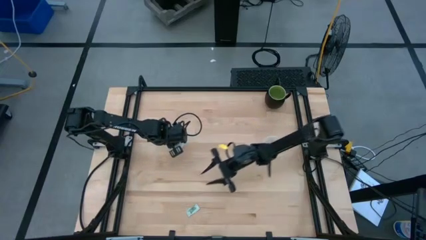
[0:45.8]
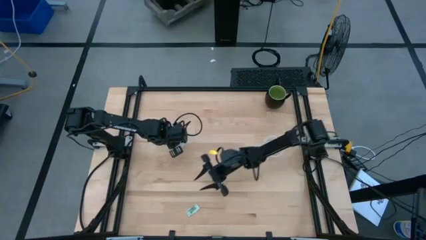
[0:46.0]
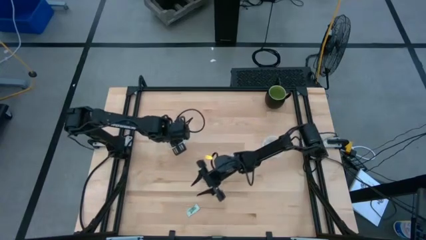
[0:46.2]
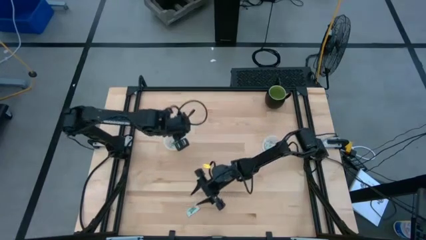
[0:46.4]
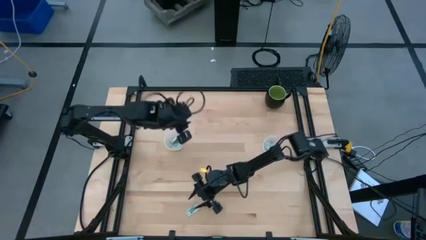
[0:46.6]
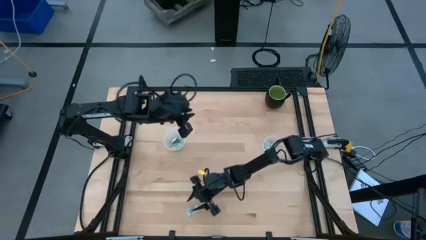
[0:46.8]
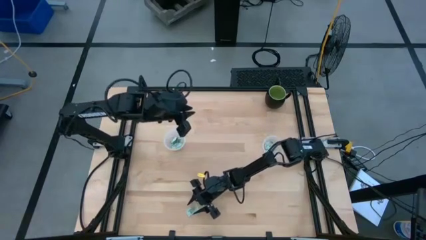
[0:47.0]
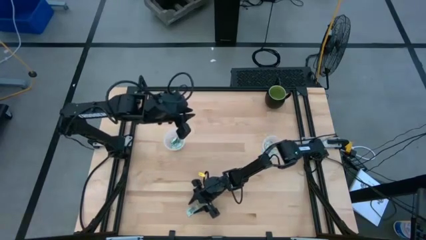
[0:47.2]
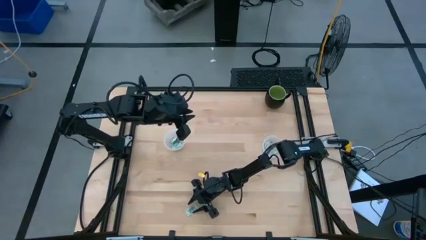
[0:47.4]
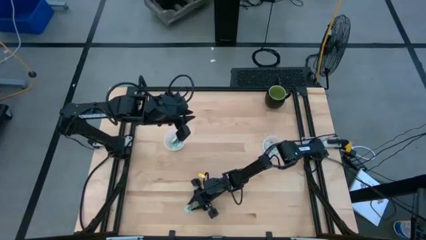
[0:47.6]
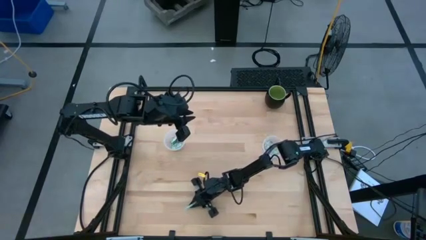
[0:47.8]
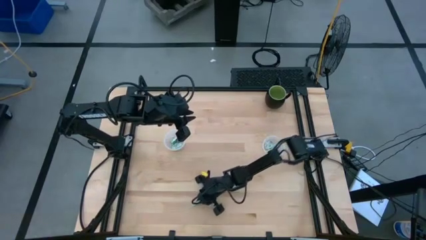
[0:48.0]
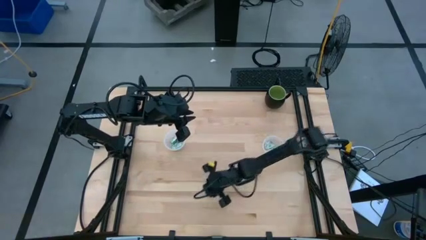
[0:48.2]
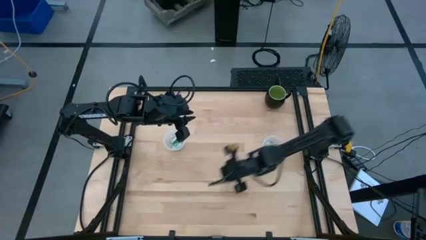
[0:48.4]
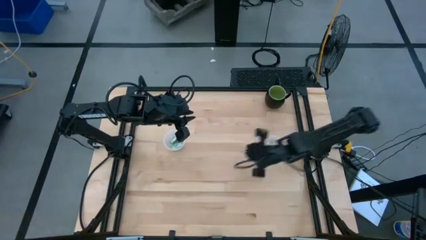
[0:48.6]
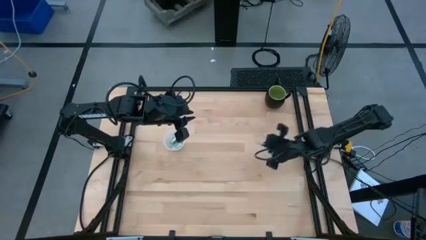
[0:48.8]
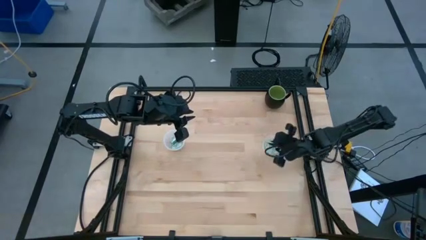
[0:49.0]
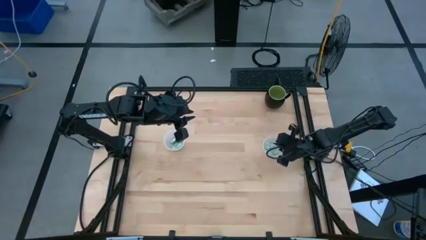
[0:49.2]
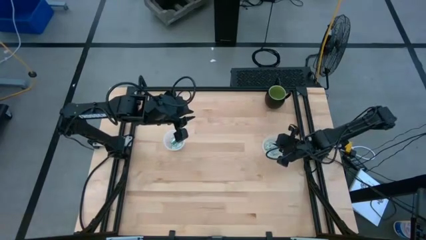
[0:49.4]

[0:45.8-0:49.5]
Task: Pick and place items into bin
Put the stevia packet into the right transparent bin

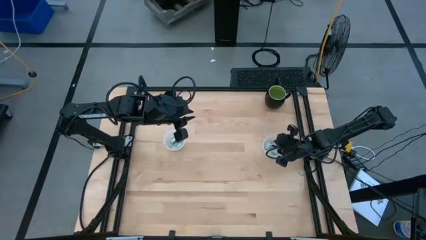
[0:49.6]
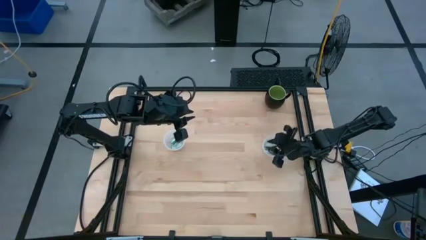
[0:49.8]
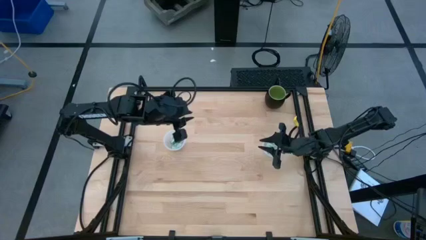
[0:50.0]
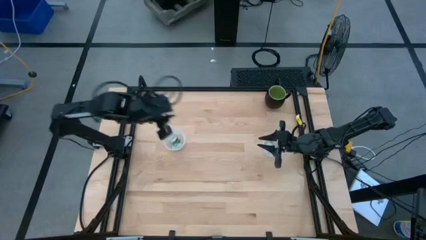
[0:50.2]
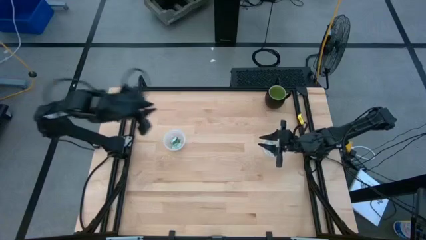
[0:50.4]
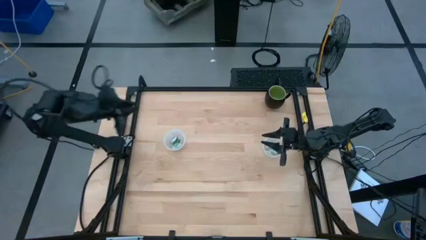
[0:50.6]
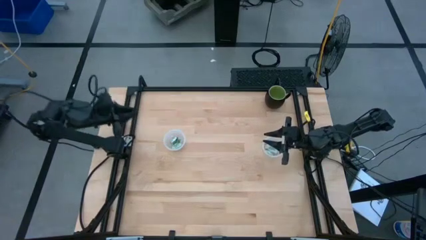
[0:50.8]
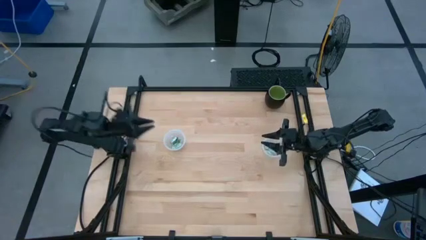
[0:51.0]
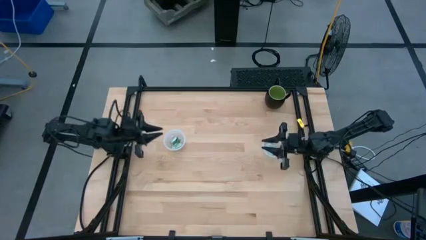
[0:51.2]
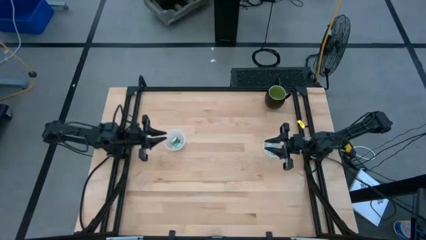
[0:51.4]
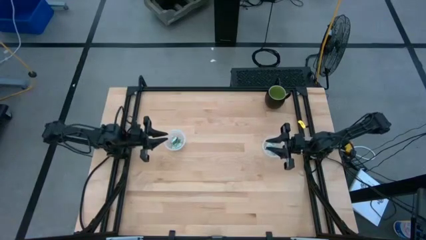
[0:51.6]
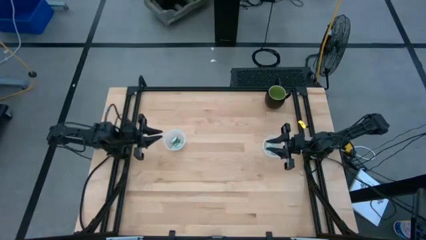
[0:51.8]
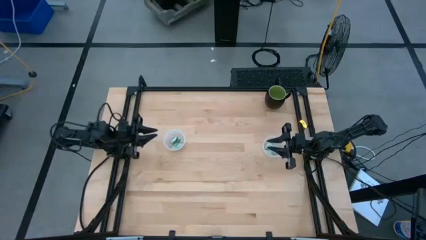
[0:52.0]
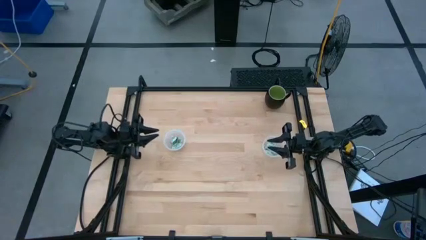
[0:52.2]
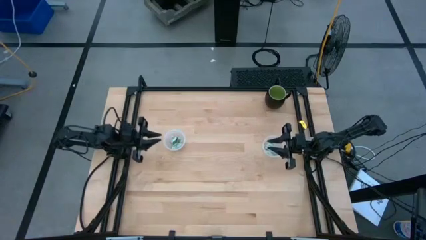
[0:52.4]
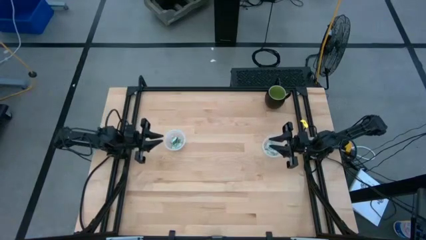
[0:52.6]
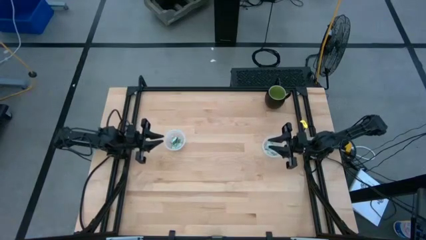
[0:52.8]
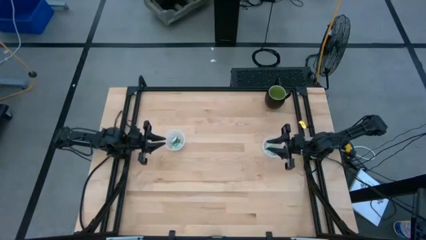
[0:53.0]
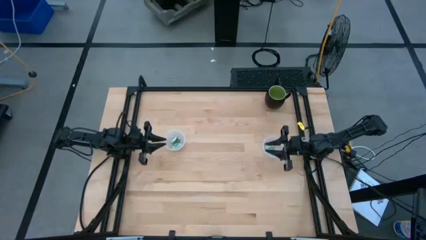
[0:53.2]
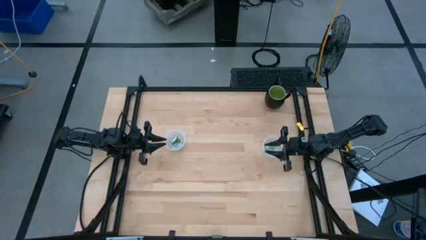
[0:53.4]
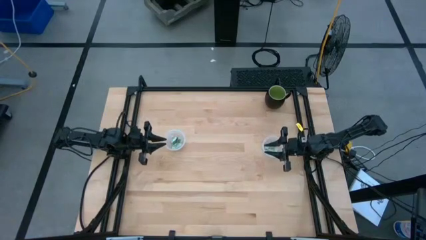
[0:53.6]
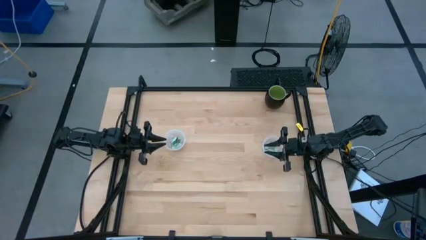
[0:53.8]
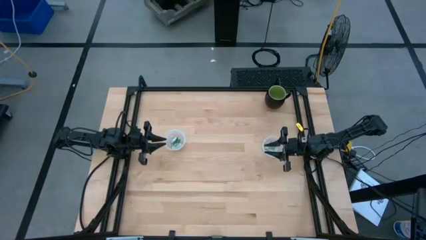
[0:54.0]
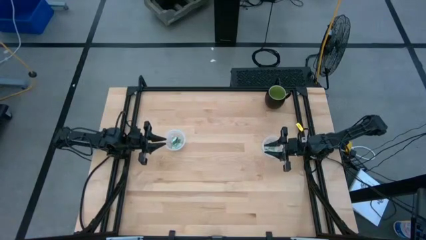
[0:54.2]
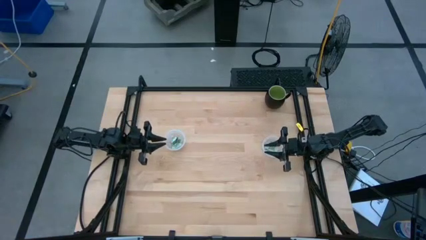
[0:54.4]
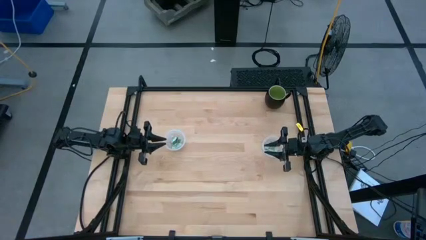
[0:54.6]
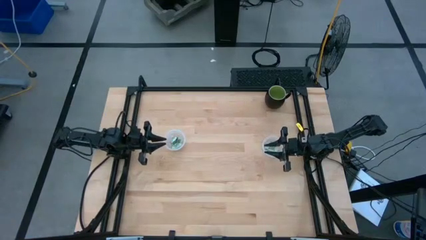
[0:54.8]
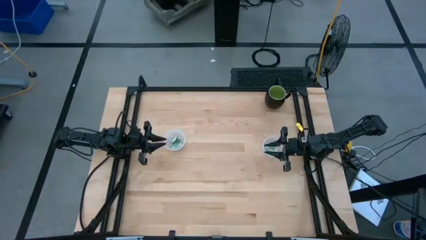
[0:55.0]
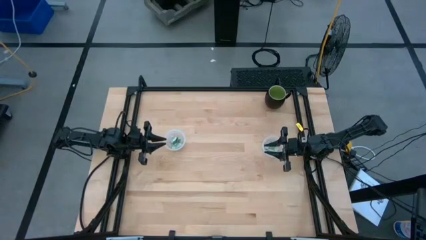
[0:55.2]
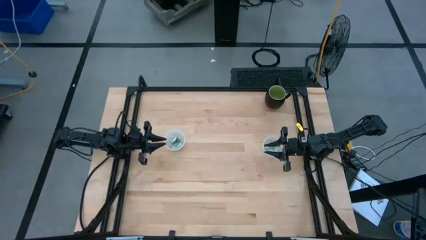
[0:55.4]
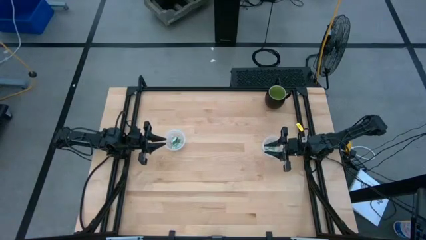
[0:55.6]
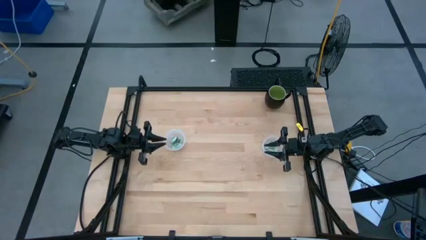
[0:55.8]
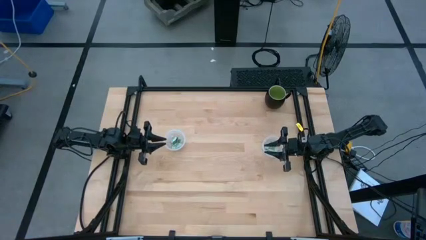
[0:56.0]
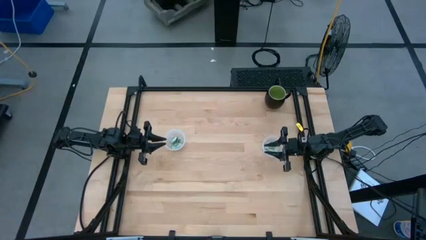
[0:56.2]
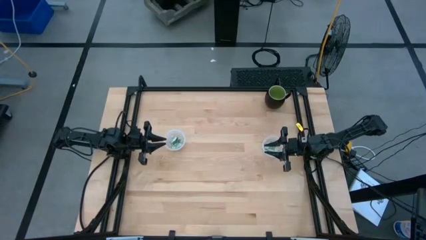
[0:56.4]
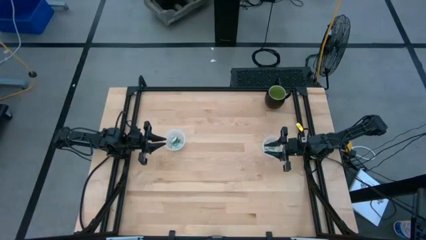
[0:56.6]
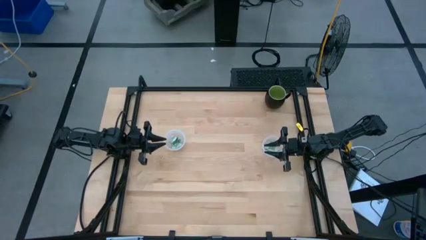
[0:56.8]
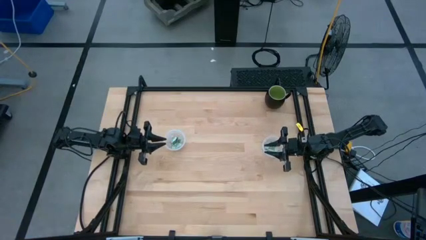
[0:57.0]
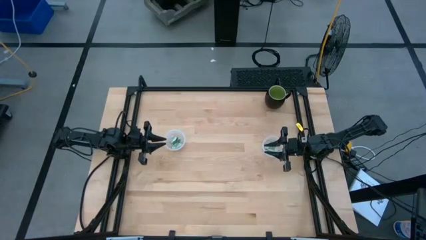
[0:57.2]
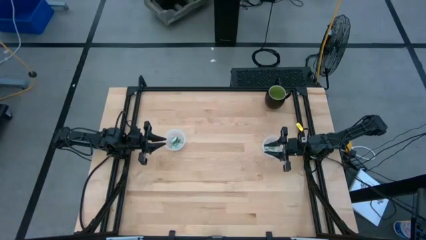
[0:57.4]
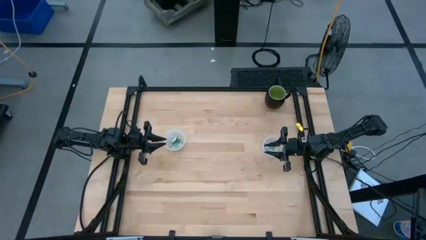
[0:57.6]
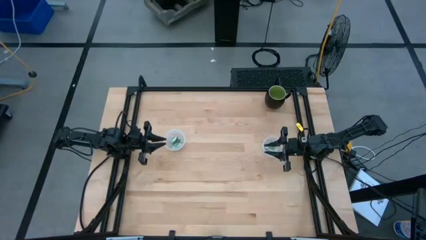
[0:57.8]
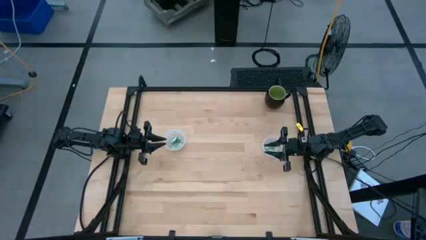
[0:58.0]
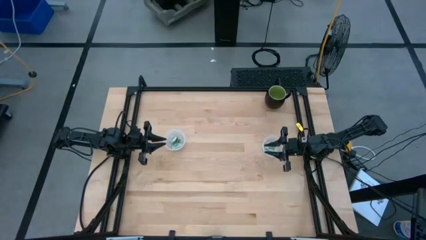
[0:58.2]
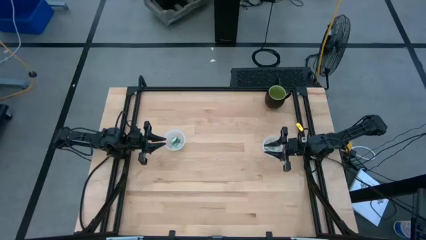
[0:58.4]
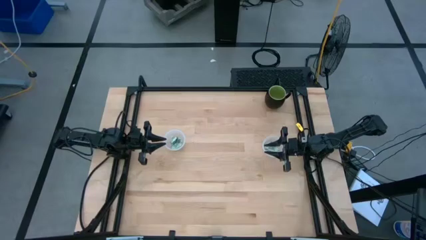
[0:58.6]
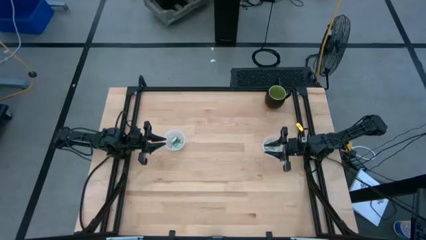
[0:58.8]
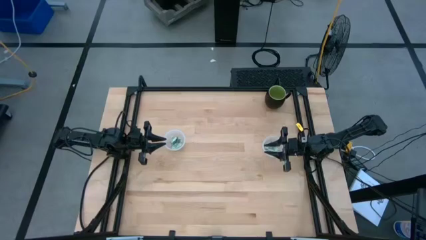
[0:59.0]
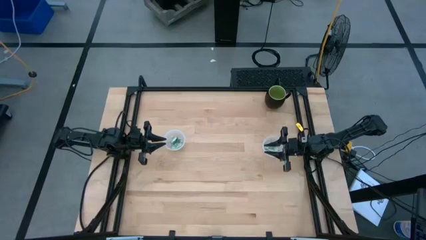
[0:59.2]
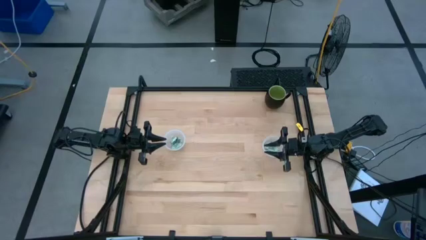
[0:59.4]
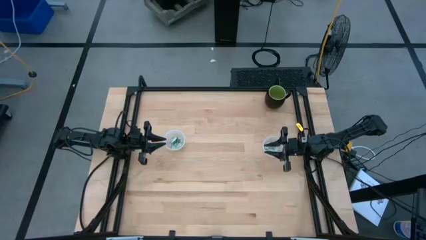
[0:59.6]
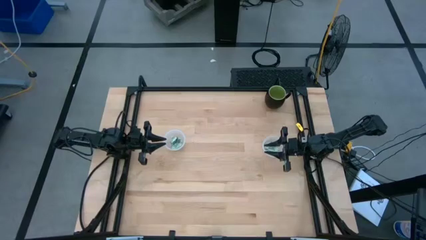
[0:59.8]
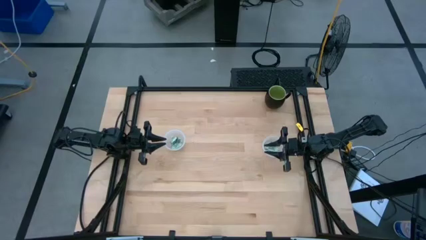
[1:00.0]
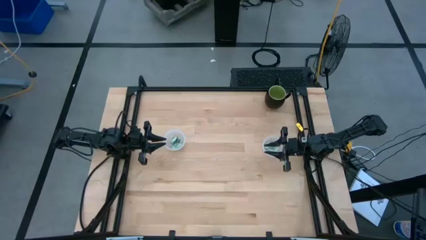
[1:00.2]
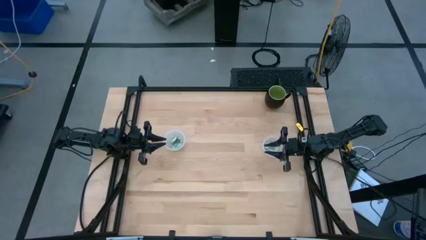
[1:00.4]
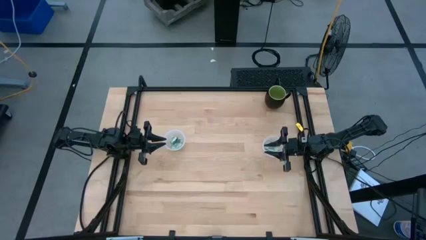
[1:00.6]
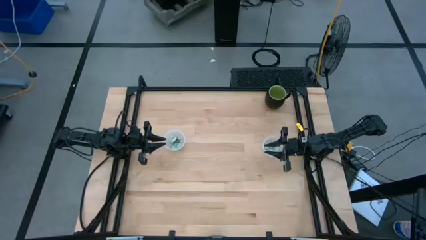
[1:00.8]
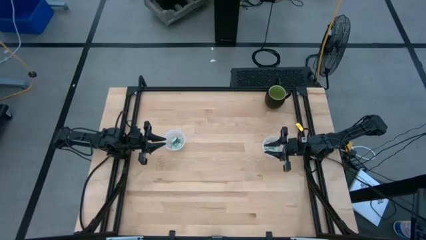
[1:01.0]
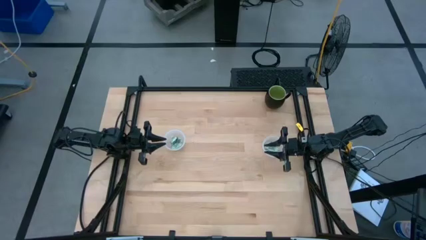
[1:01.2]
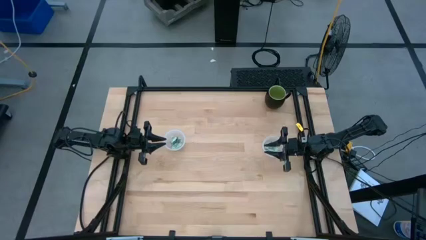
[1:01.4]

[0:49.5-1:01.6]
Return to Home Position
